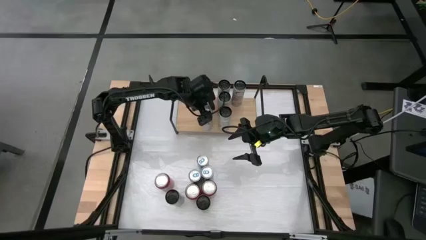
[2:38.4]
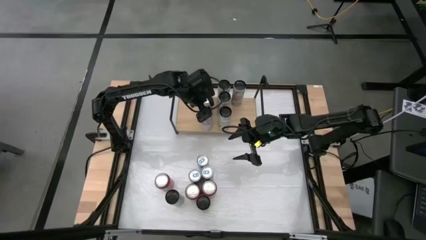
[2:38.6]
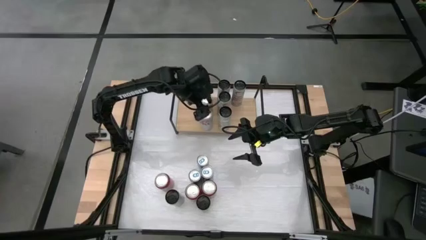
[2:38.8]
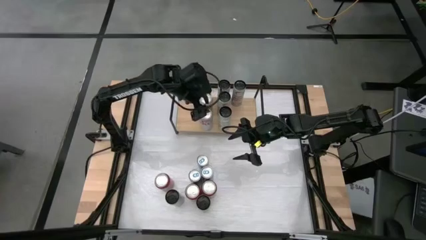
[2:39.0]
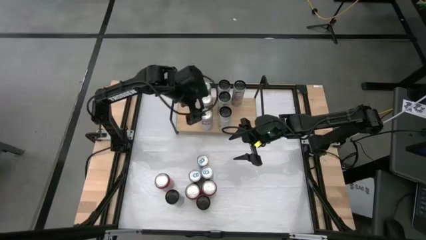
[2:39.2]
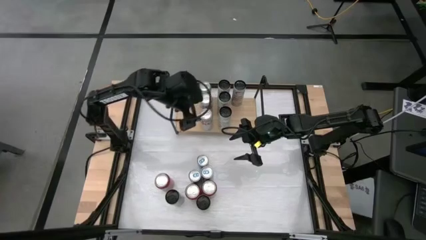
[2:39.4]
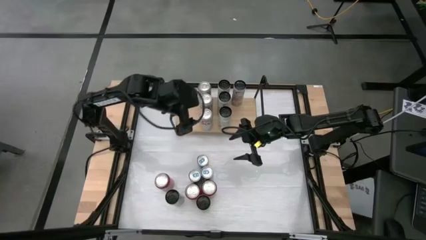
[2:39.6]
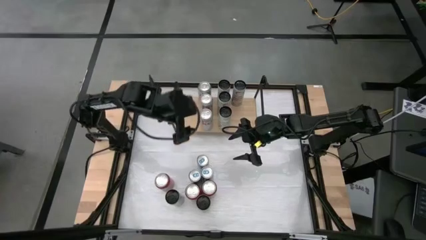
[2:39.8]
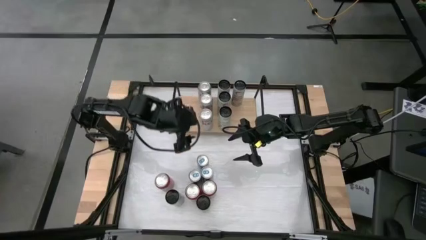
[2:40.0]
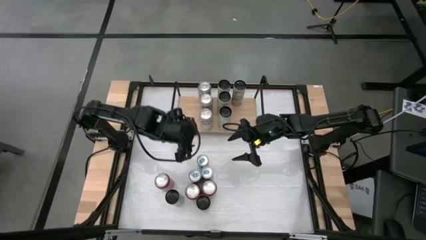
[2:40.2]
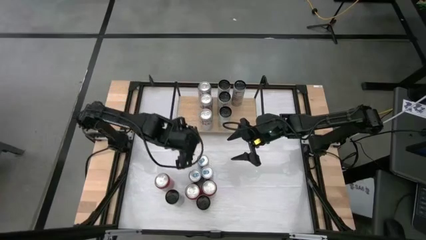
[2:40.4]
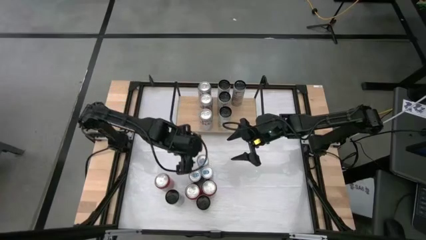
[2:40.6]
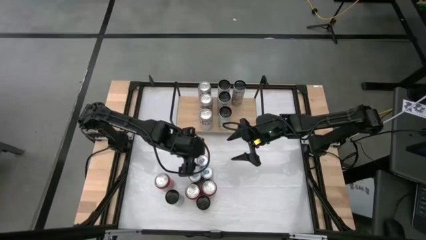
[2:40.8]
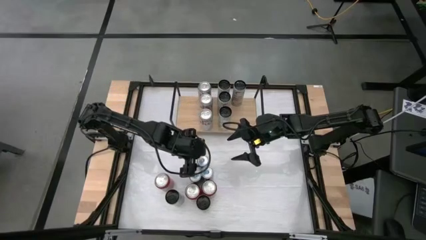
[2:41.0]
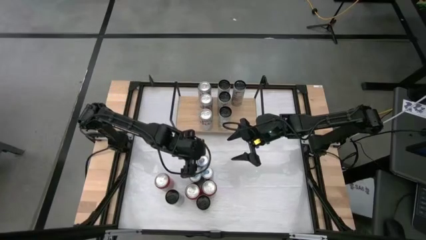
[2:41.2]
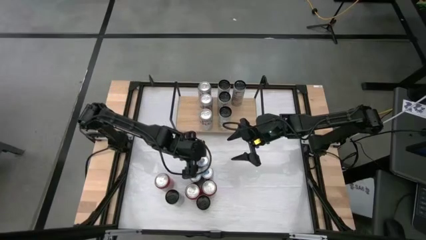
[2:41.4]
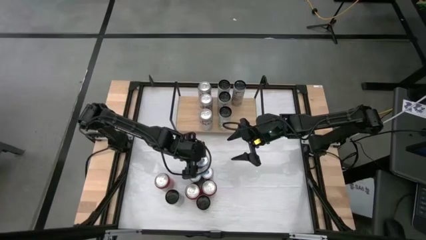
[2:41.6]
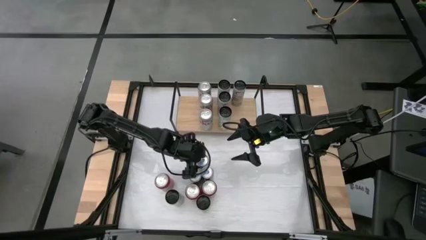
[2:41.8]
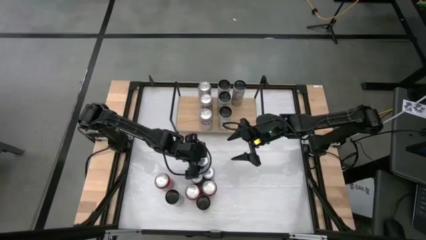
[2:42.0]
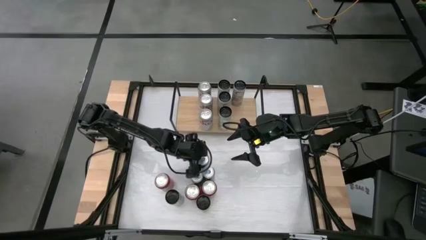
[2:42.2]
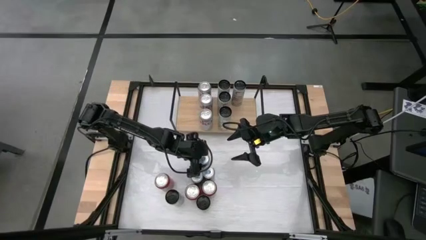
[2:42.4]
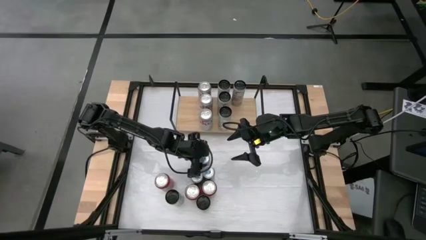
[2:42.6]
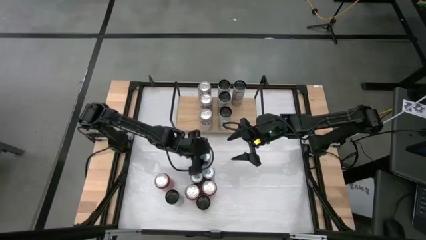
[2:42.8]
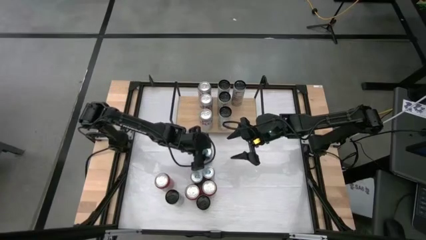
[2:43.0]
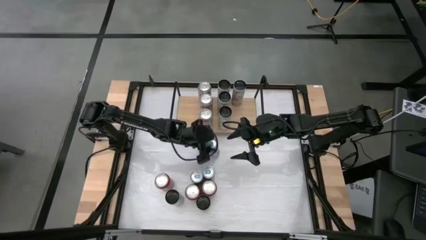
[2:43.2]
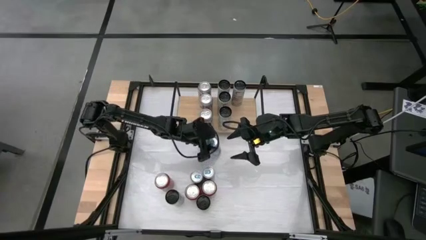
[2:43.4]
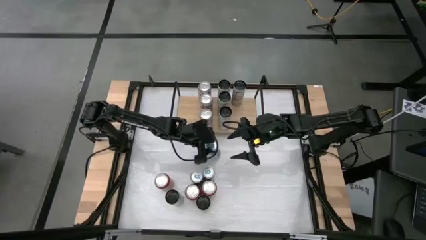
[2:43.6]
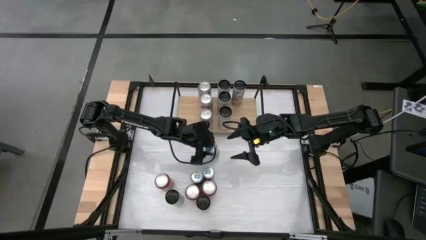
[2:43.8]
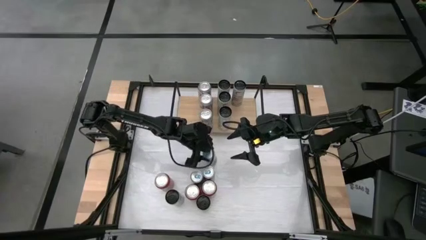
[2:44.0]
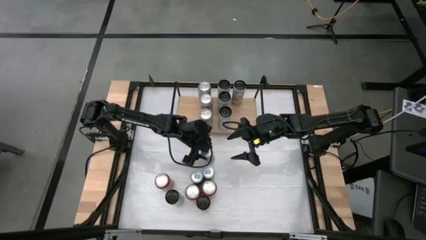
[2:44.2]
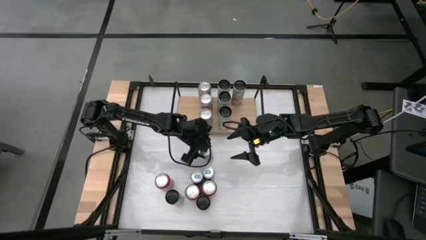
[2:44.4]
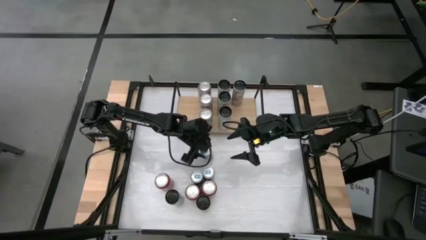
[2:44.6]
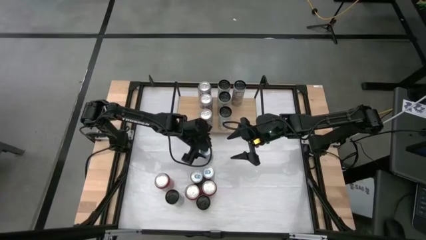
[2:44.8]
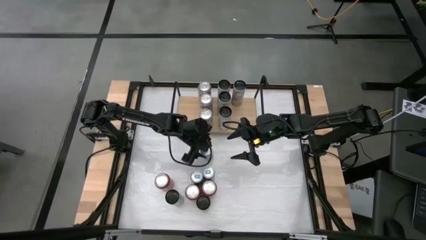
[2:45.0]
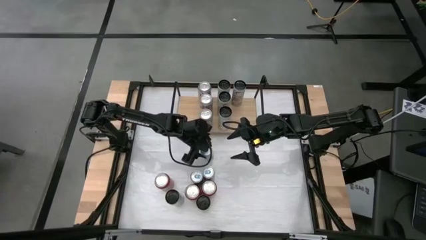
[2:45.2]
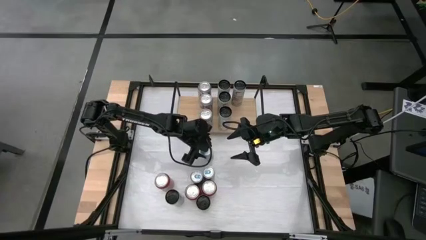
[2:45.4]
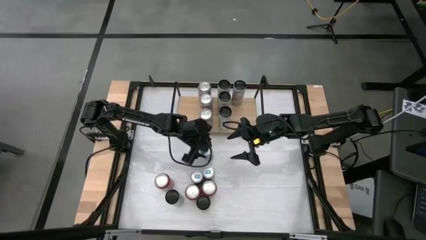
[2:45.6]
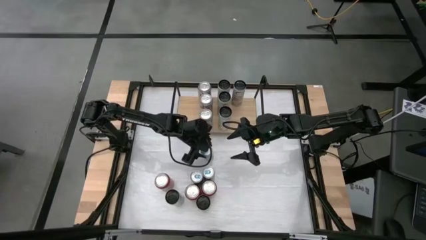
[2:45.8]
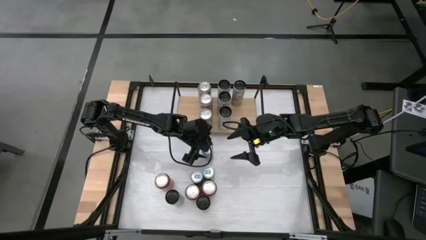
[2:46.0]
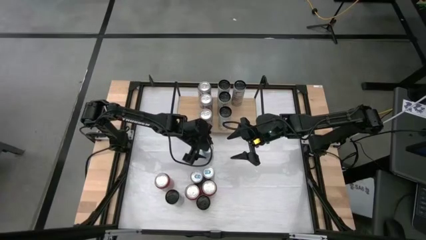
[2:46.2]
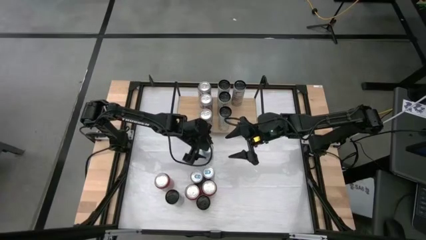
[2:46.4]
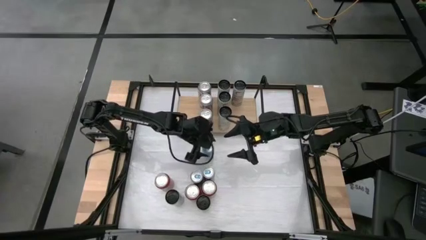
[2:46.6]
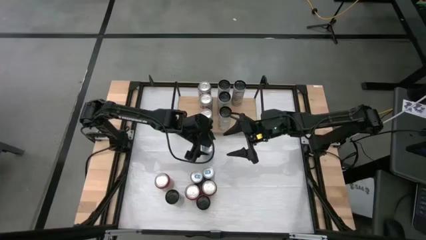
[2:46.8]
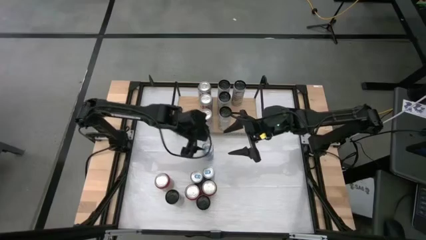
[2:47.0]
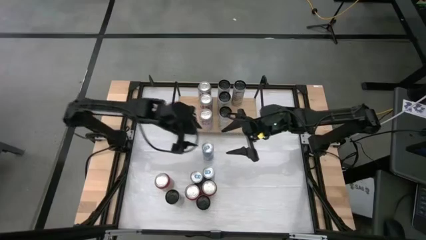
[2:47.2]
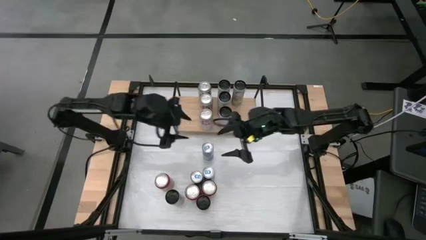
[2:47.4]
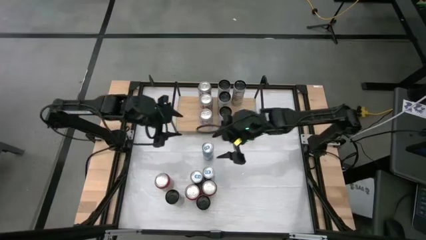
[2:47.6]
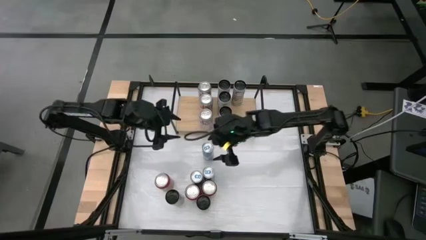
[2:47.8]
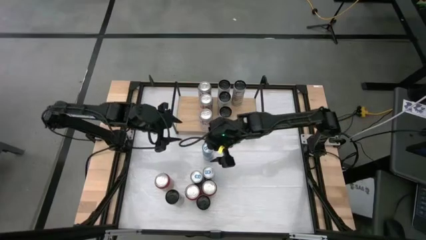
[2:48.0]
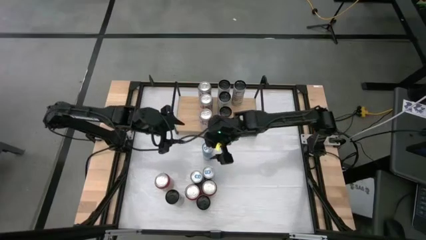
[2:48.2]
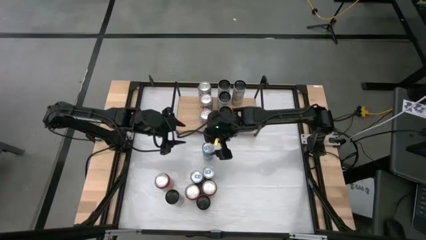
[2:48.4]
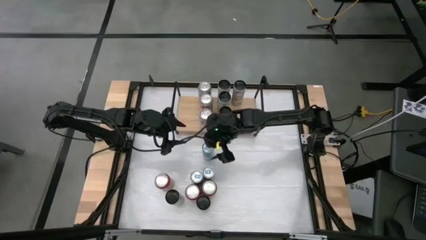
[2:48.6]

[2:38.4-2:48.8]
Task: Place canned beverage on shelf
Put the blue soda can onto the shelf

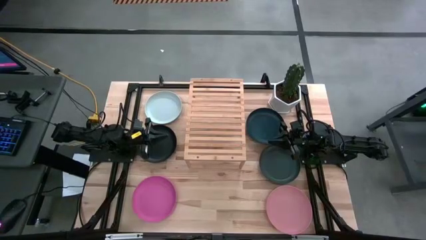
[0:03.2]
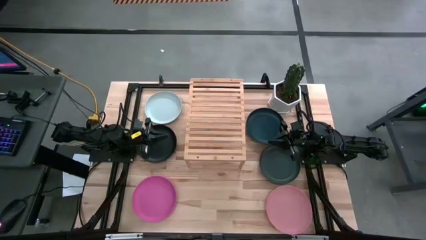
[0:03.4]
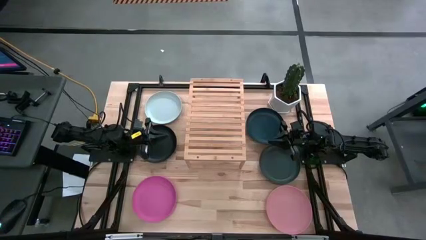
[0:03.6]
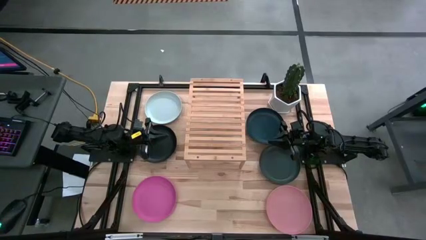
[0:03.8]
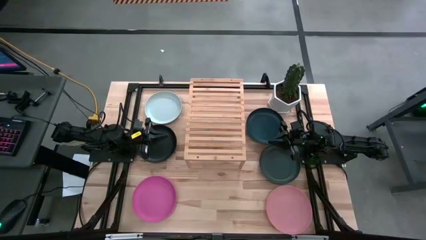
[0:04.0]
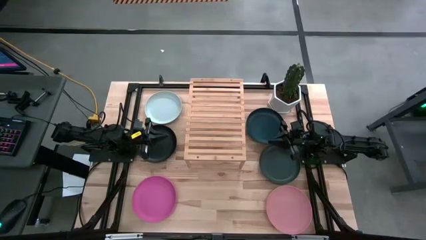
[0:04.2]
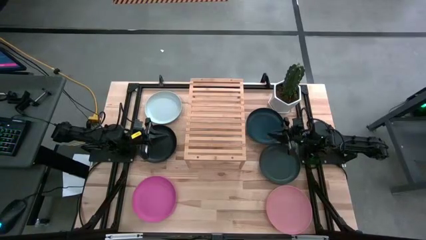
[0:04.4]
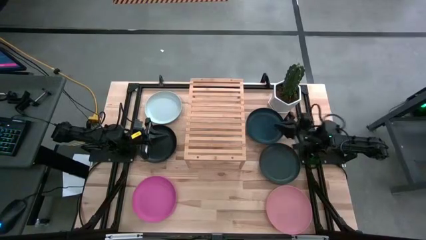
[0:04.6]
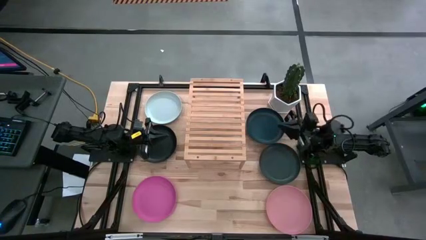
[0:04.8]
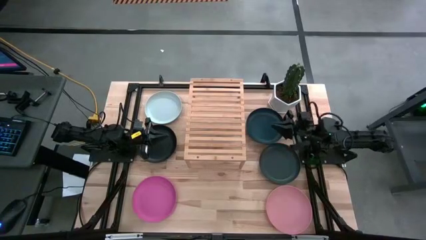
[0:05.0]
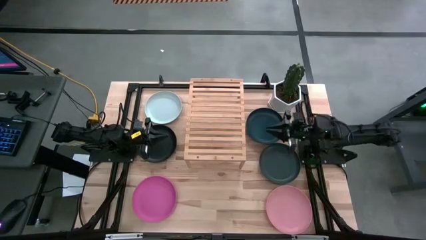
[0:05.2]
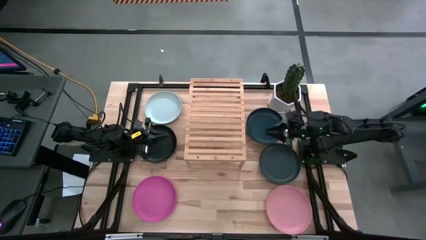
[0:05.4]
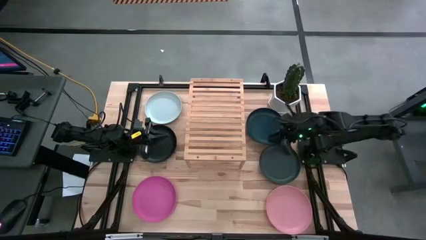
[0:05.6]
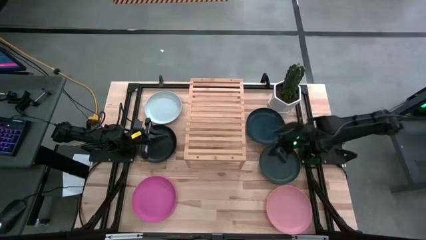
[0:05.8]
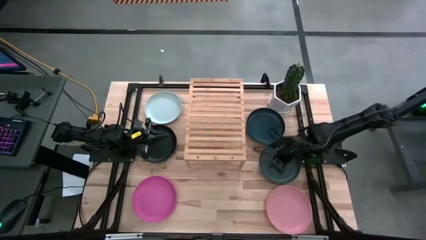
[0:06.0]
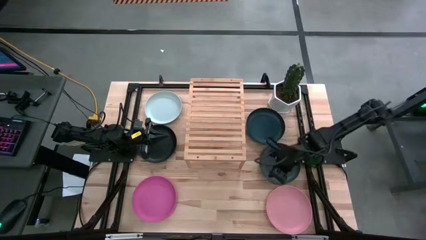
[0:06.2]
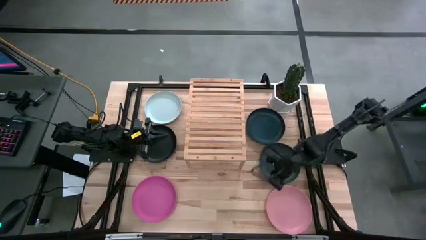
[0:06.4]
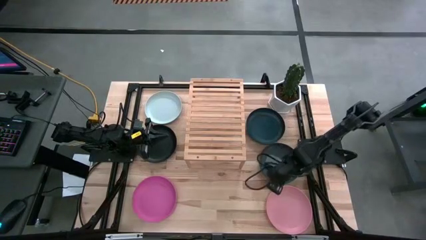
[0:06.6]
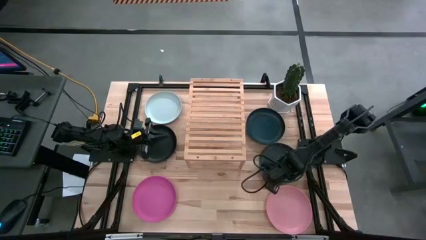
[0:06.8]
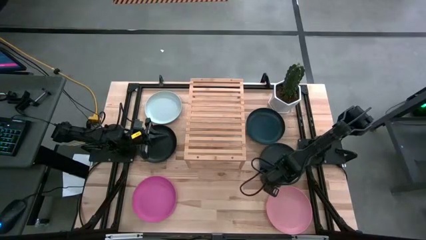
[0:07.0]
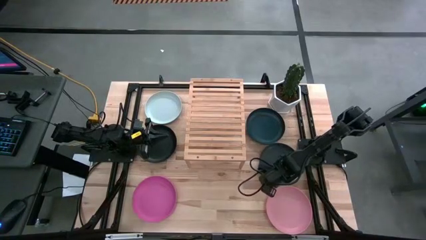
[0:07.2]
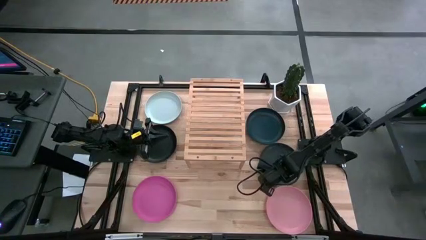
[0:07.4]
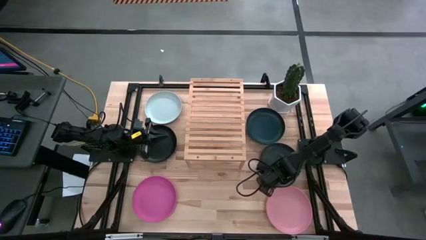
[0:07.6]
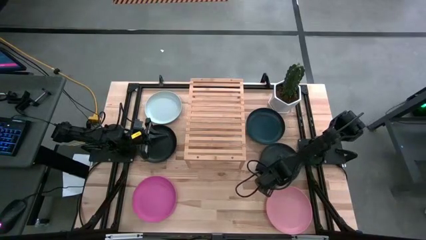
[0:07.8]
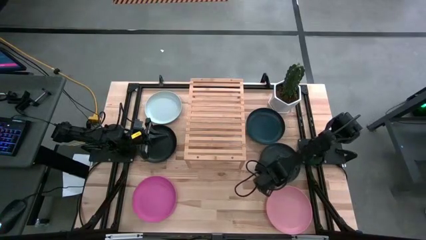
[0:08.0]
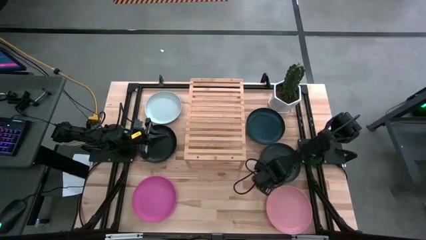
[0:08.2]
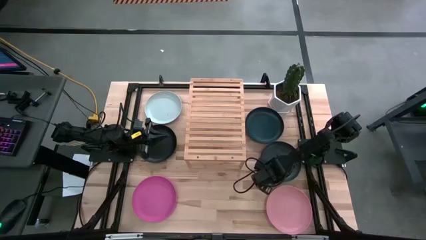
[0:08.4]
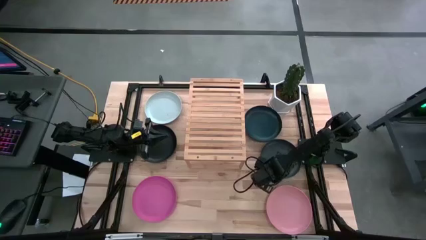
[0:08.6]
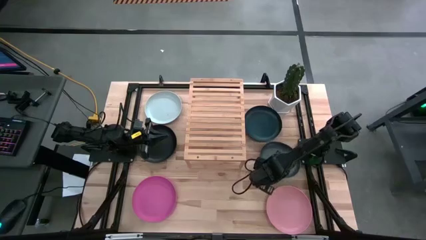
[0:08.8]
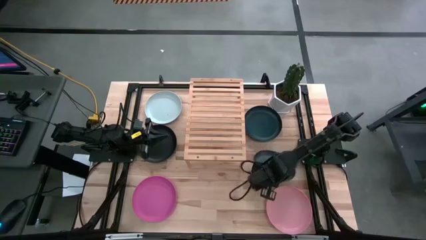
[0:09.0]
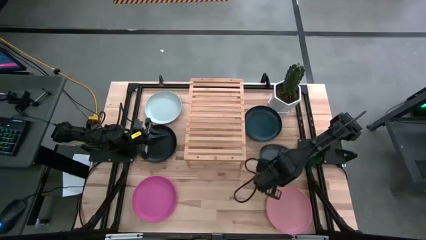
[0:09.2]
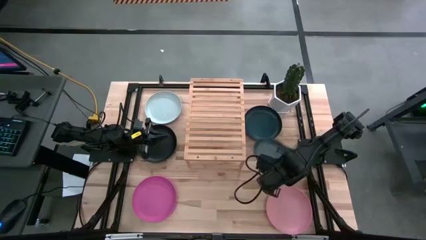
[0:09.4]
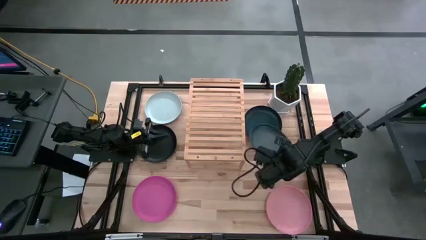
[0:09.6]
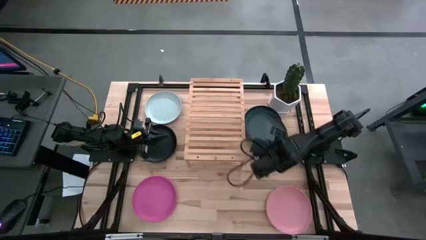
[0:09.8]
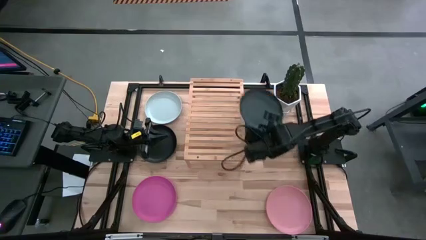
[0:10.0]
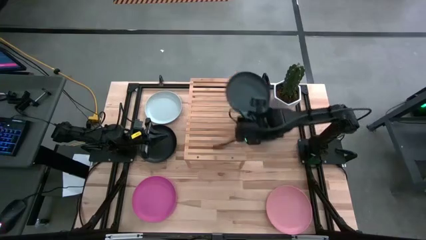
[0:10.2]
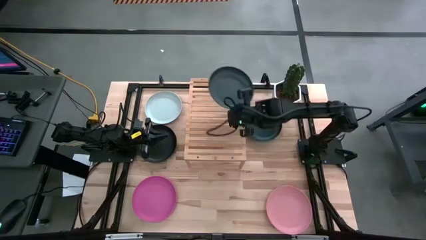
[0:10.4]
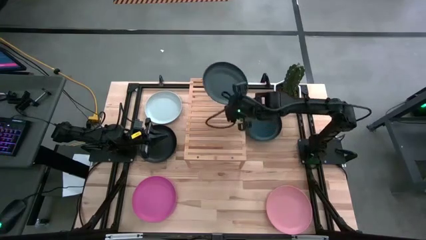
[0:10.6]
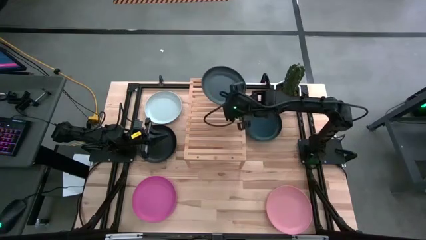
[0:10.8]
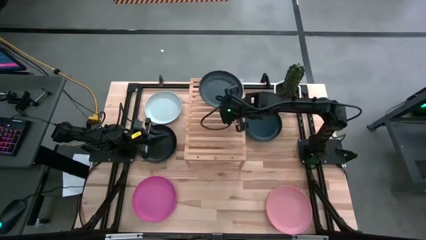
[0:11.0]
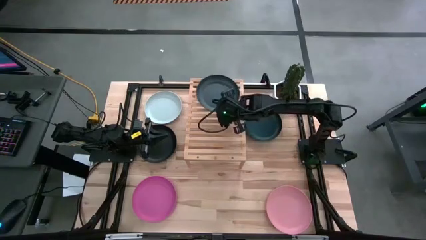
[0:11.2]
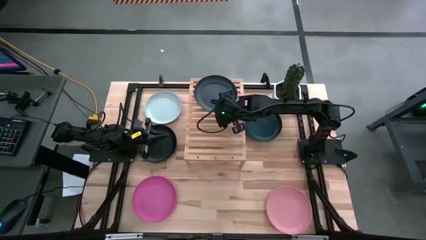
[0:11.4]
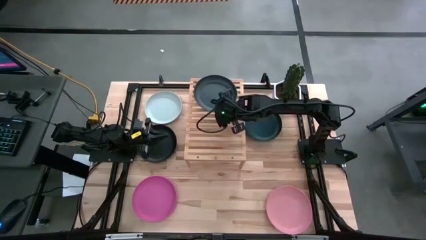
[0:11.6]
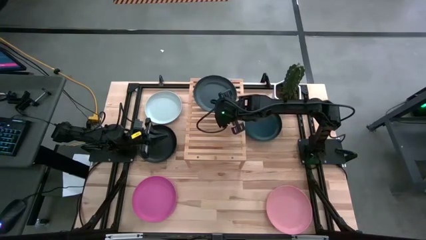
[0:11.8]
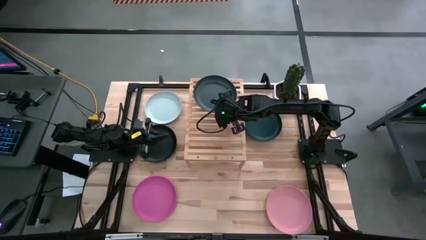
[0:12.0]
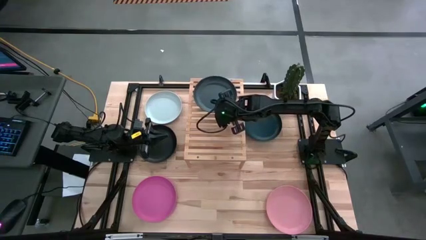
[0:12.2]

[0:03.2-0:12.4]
Task: Place and stack plates onto a shelf
Put the right black plate on the shelf
